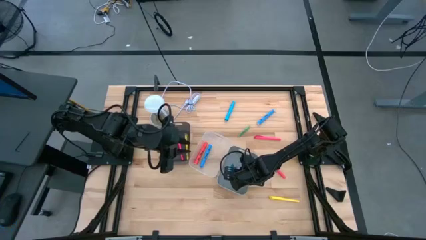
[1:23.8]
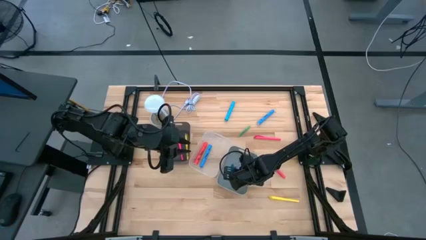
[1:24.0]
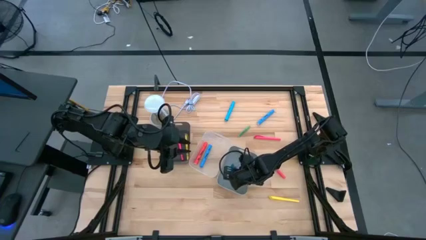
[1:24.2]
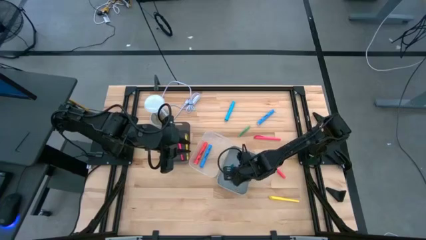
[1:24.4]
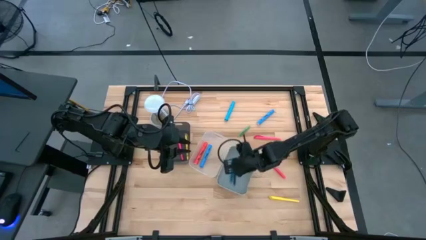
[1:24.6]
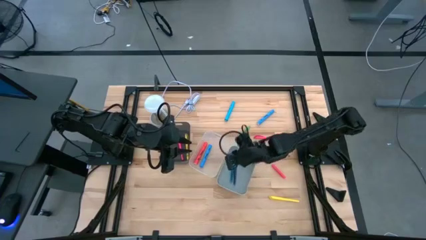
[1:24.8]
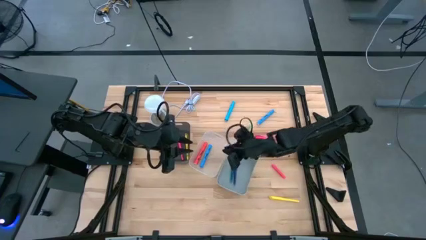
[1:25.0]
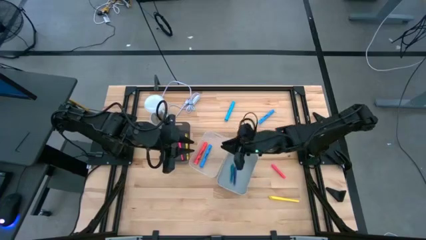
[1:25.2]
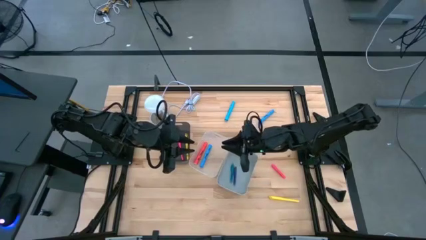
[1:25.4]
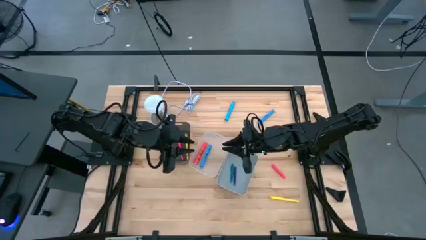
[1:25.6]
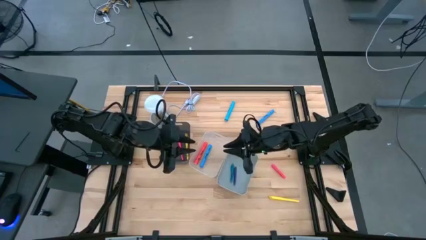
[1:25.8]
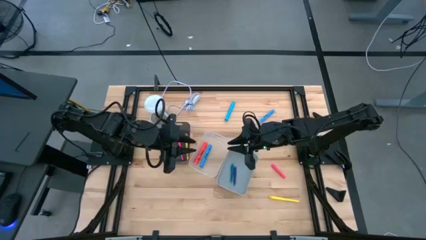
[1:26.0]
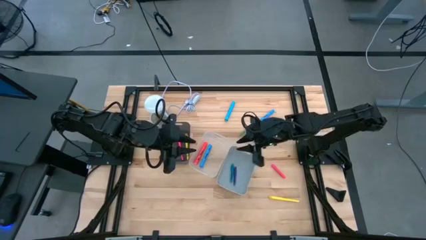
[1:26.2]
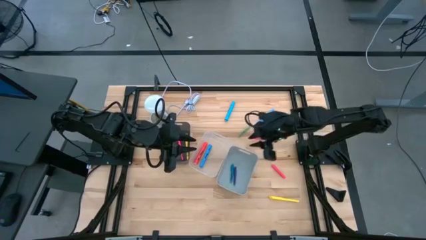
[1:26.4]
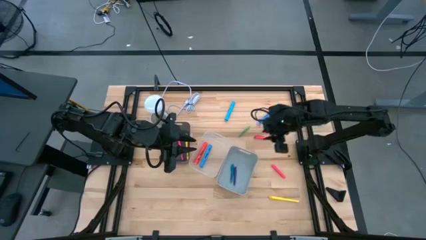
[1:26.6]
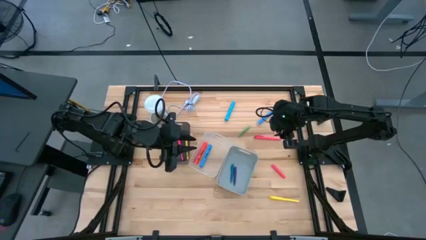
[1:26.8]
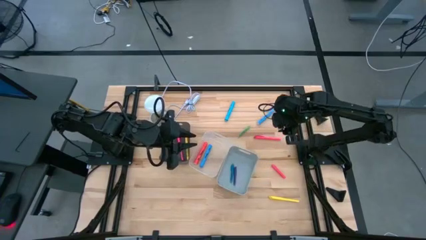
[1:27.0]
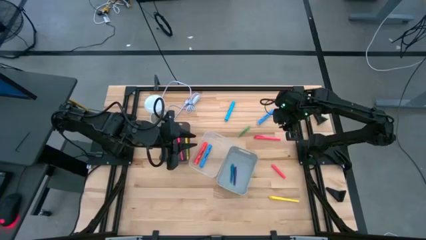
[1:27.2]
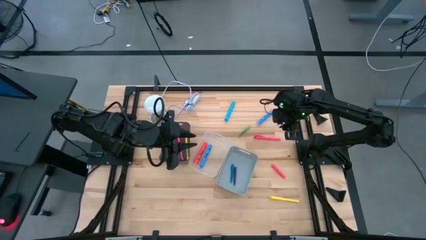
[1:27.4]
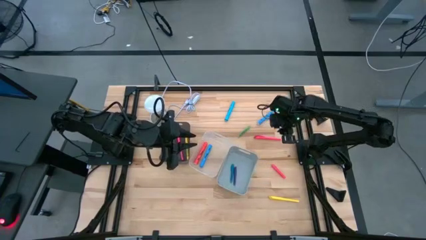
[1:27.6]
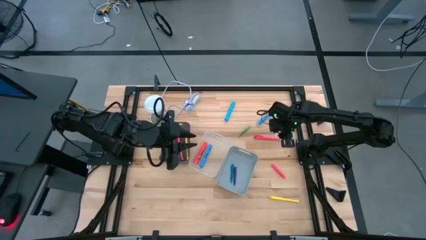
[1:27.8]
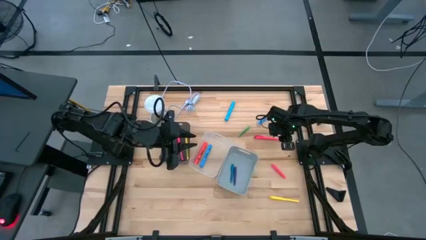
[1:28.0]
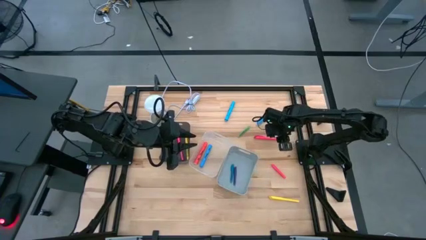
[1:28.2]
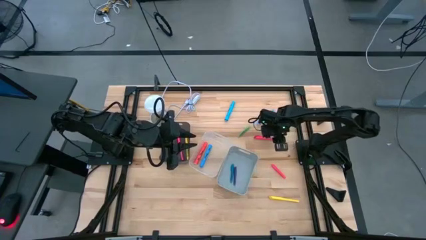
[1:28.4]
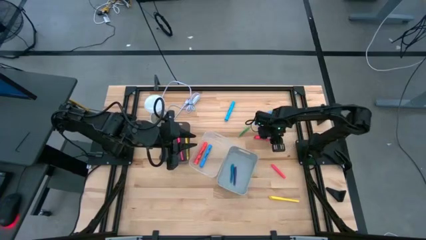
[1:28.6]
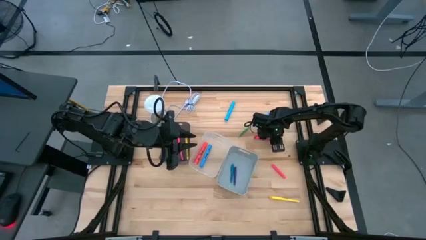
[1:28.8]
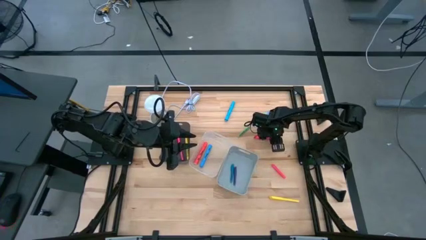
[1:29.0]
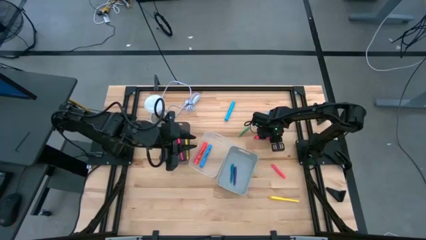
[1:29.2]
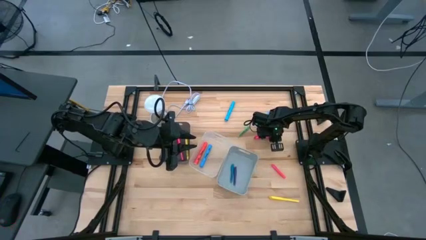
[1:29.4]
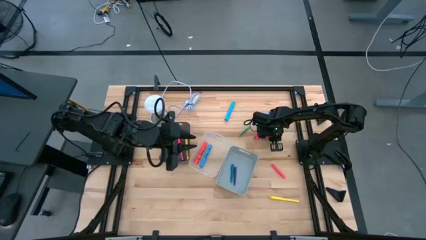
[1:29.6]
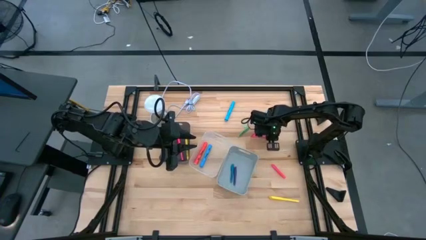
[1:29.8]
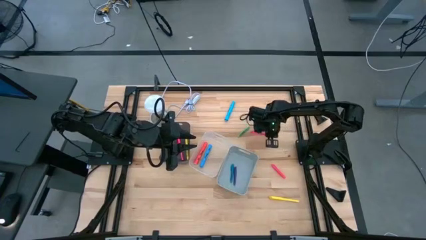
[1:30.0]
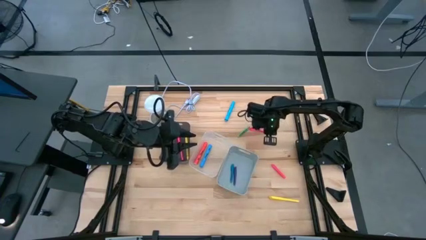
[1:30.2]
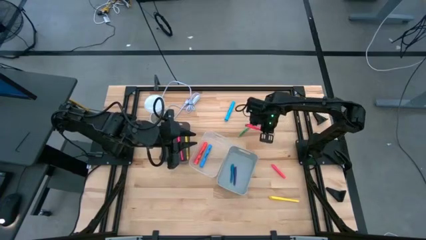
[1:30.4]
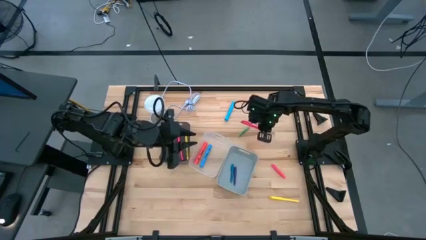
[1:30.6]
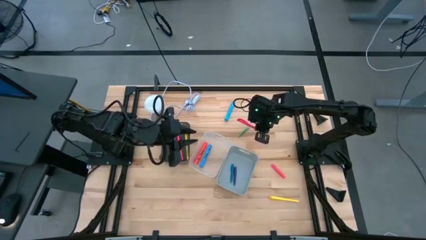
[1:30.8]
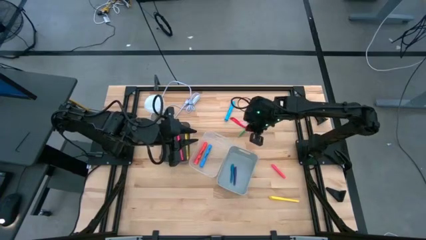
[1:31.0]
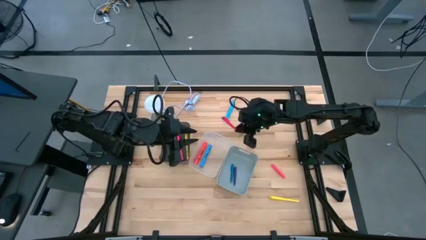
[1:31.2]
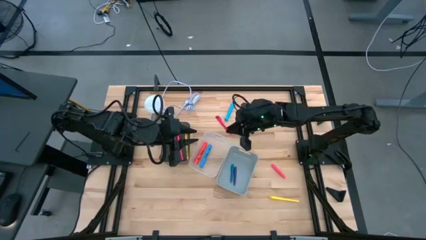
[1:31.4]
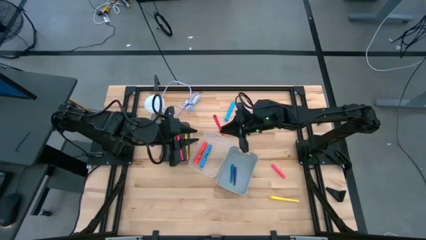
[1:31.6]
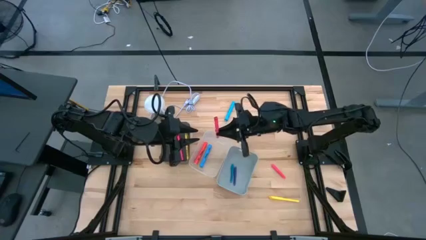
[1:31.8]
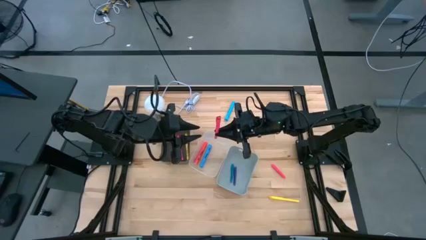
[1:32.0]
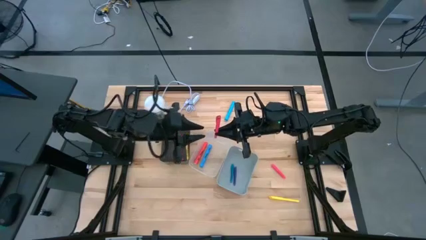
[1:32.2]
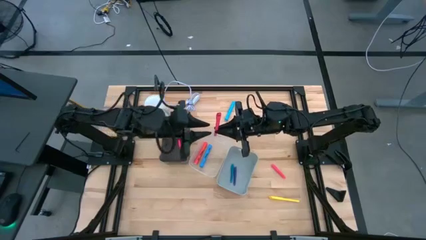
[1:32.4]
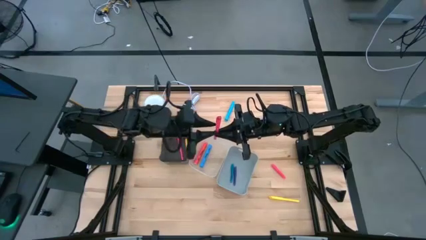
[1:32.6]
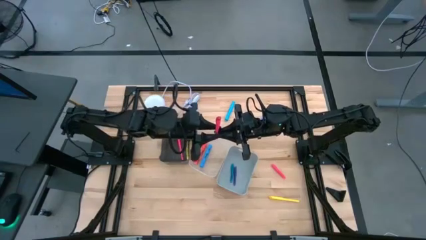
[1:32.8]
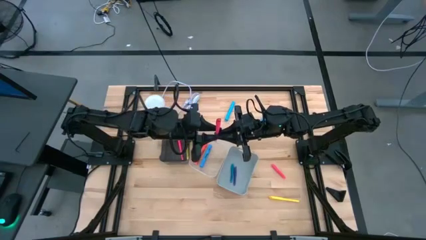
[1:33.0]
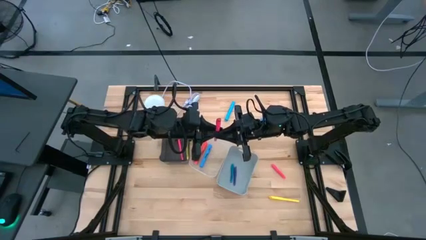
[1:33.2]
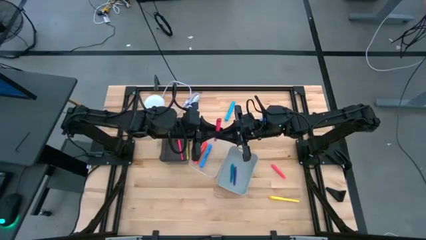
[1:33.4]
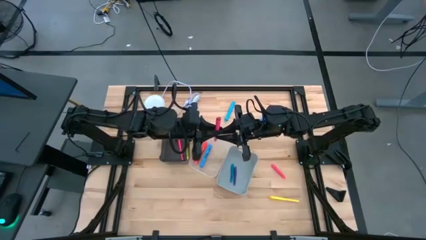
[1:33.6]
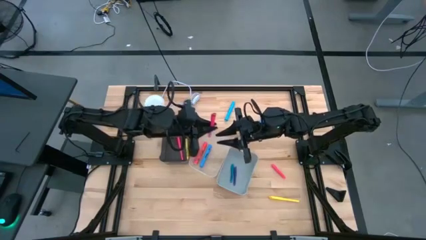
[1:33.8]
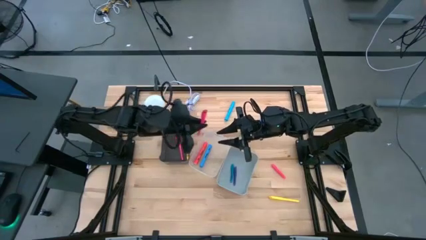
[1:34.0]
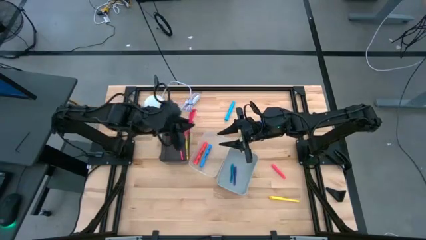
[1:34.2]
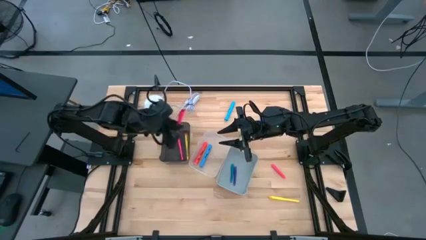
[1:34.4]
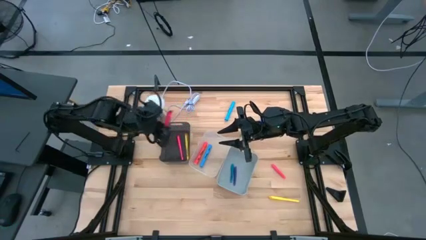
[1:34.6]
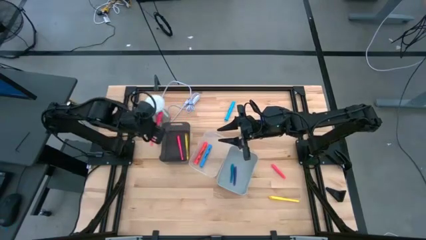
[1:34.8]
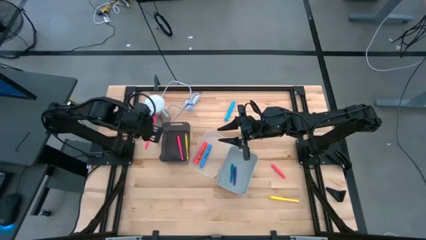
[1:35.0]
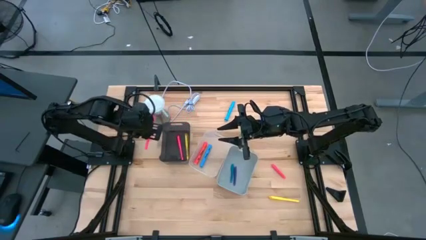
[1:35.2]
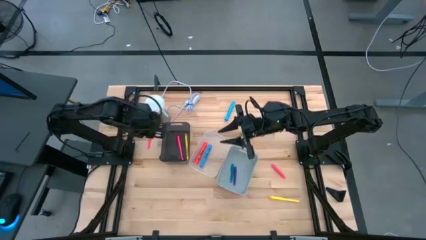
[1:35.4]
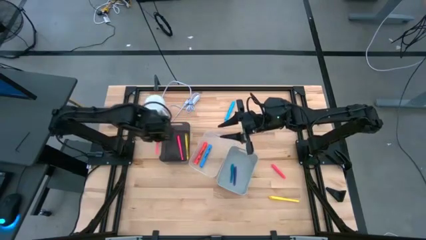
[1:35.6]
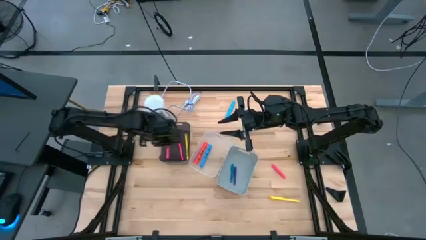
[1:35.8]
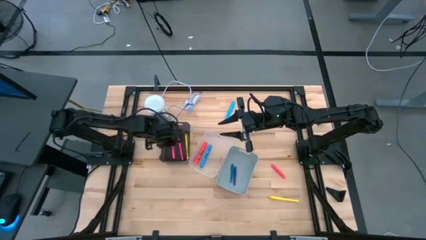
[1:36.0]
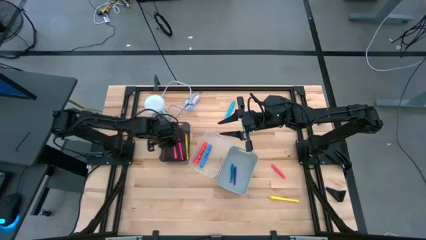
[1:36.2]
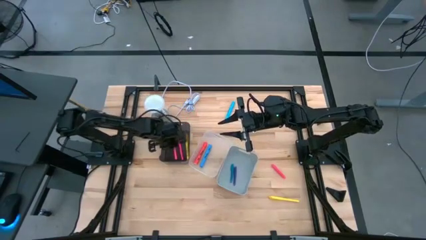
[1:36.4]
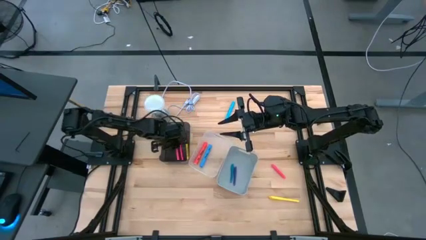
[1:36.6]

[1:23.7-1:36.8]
Task: Pick & Place Markers
Put the pink marker into the black bin

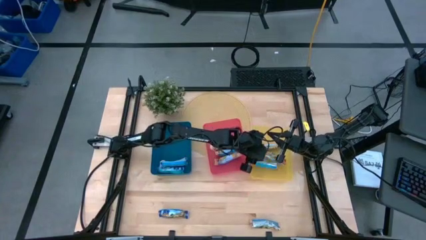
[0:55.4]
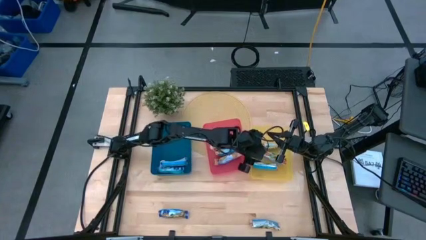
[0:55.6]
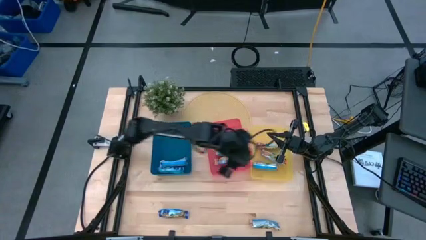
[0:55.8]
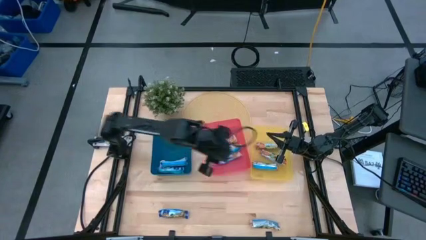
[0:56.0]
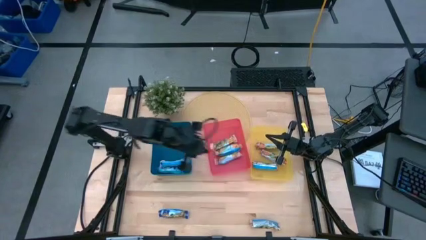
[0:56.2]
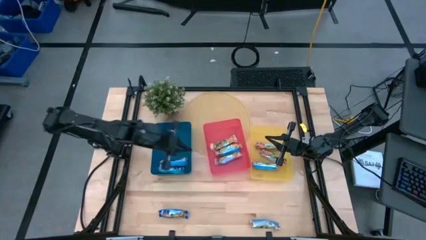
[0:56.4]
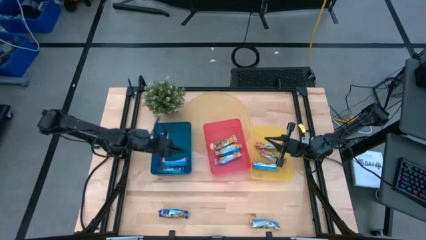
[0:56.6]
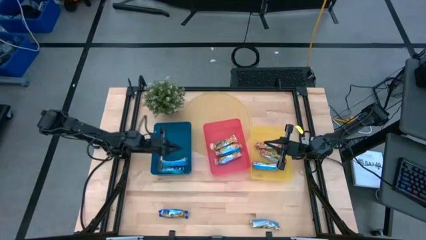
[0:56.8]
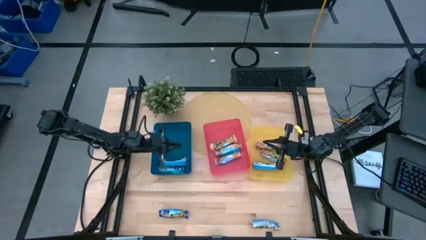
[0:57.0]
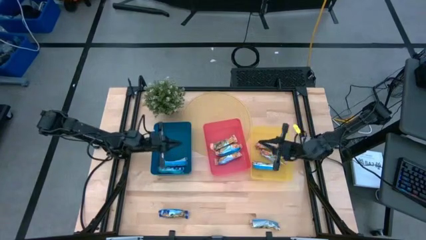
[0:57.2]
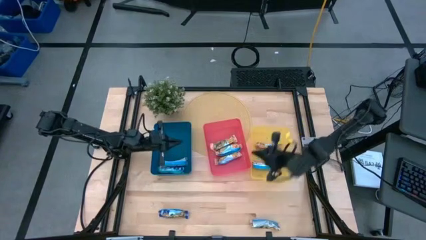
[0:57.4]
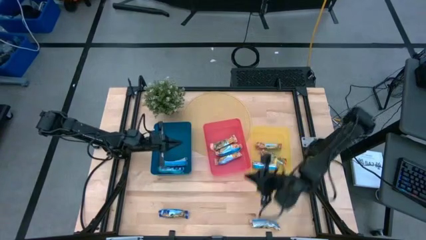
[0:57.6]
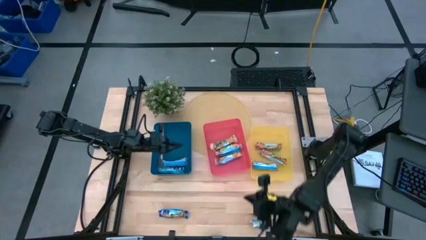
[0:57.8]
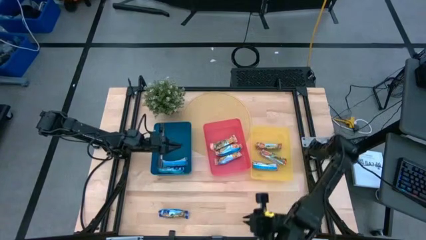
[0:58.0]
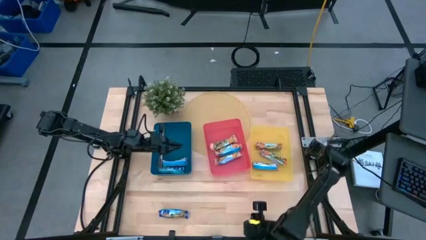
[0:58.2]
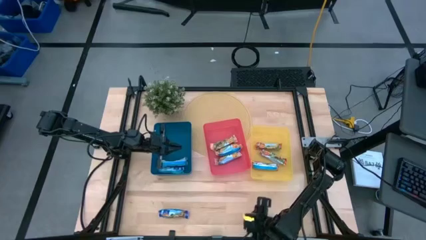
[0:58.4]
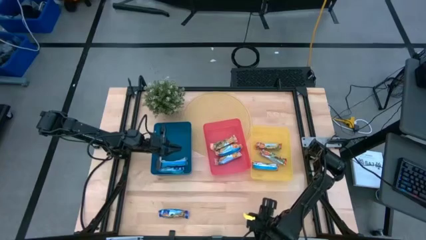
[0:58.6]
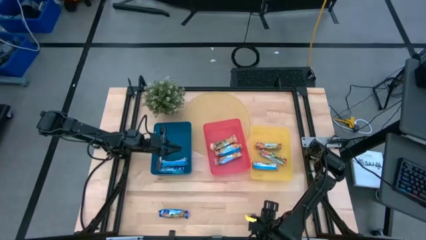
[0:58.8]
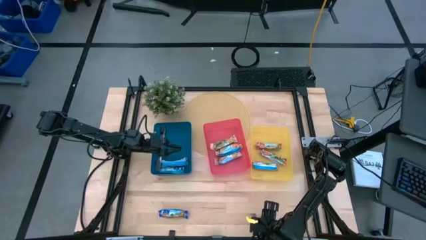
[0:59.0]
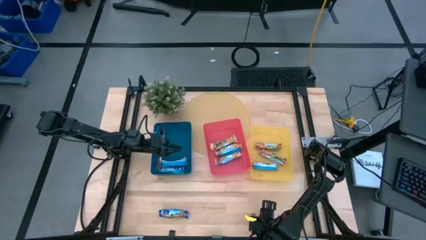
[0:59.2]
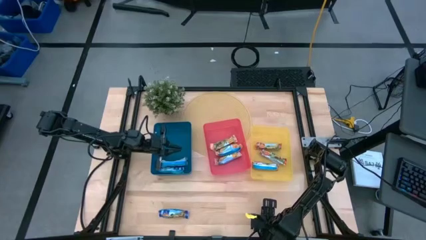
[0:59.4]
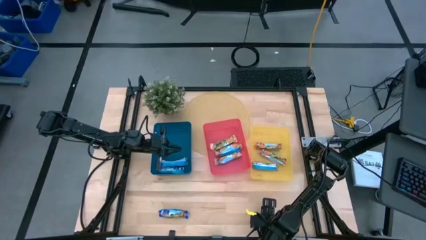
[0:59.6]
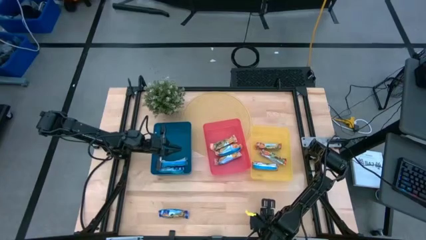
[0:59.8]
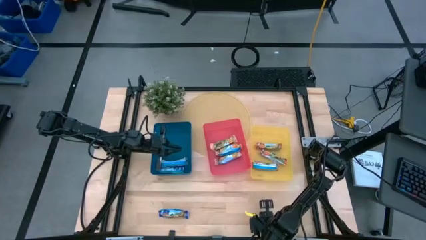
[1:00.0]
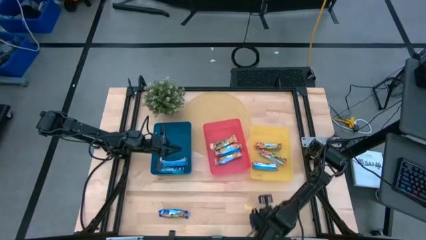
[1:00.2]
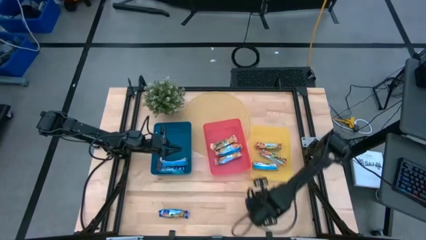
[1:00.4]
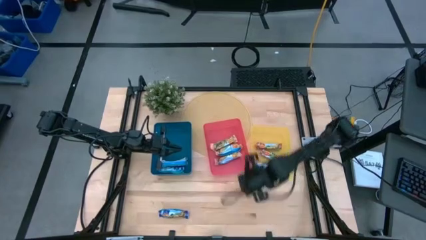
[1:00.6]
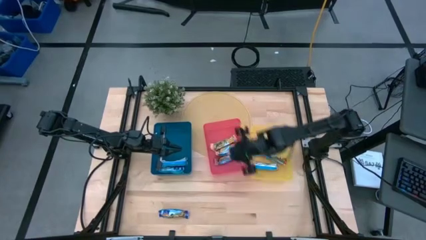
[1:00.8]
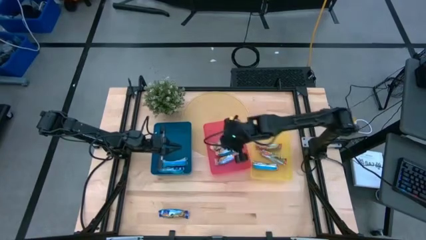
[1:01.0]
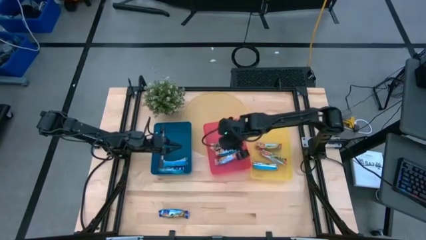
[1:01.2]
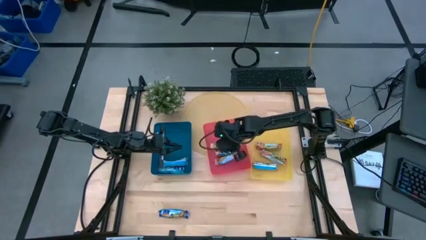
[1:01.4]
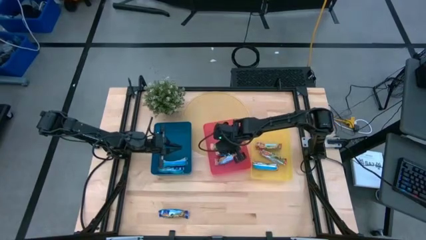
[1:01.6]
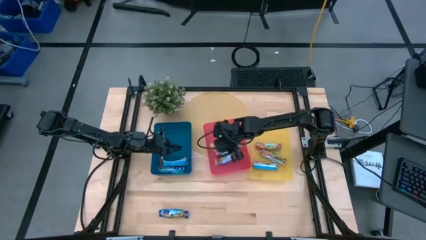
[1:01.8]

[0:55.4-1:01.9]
Task: Pick and place Granola Bars by type
Put the yellow granola bar into the red bin
